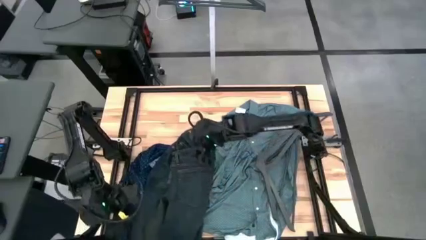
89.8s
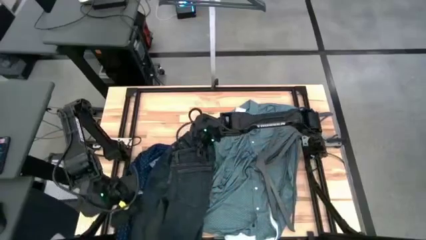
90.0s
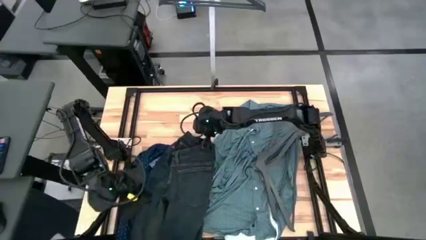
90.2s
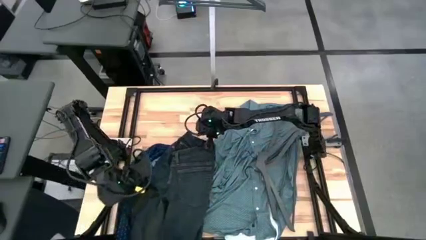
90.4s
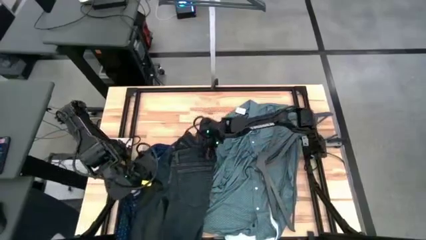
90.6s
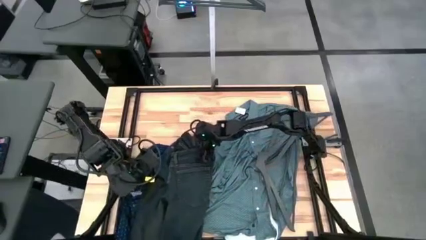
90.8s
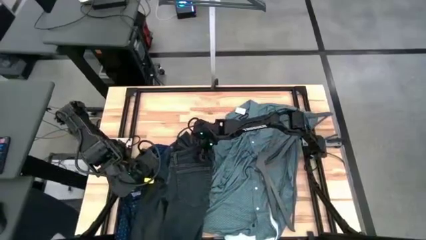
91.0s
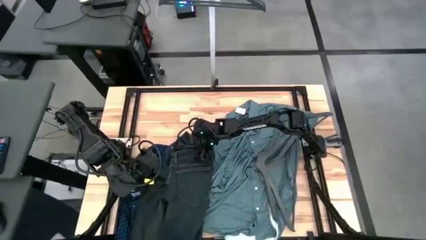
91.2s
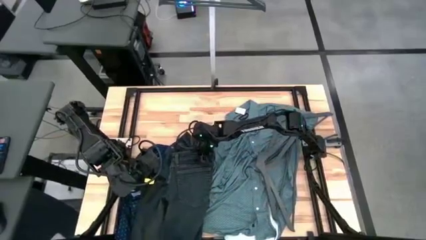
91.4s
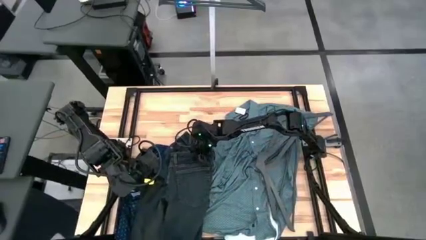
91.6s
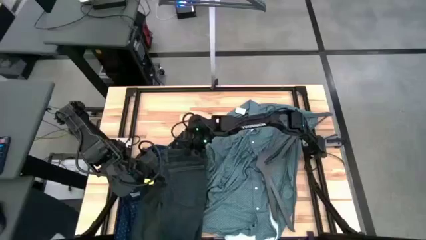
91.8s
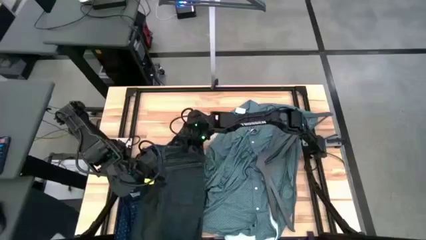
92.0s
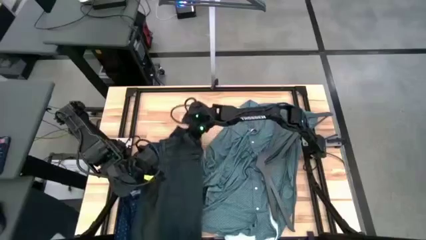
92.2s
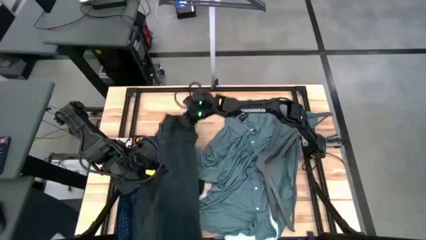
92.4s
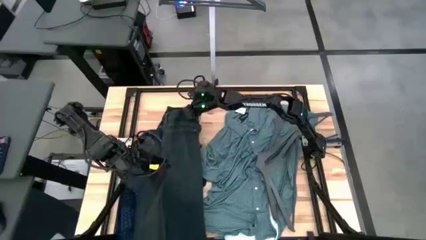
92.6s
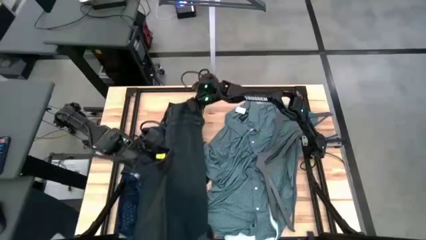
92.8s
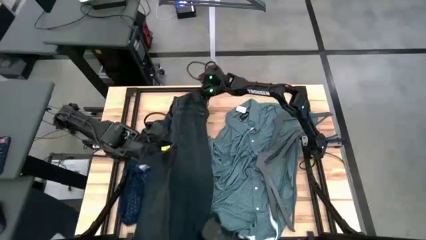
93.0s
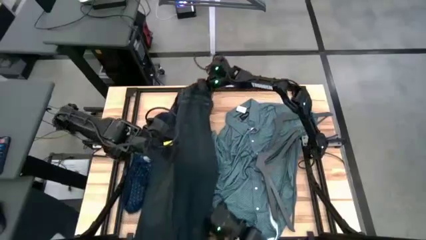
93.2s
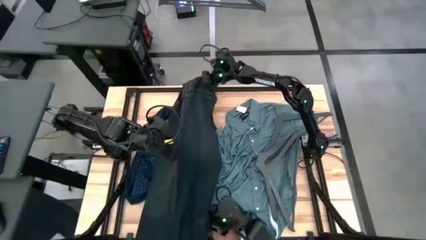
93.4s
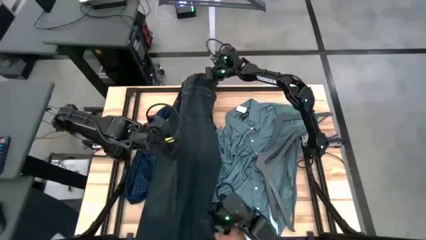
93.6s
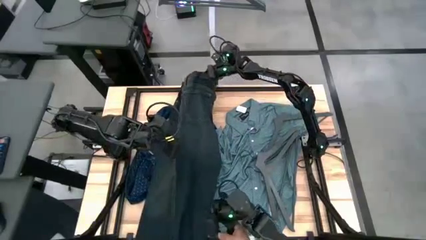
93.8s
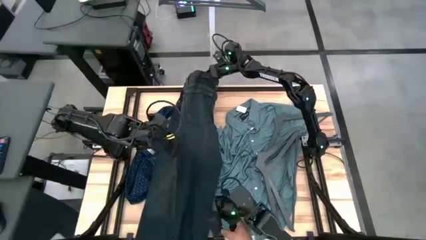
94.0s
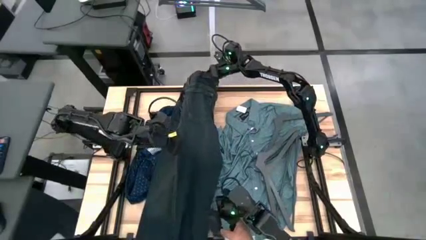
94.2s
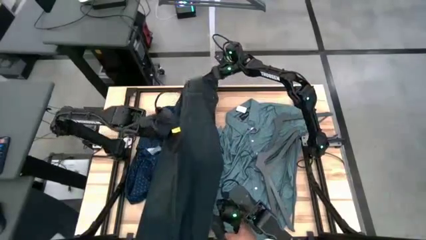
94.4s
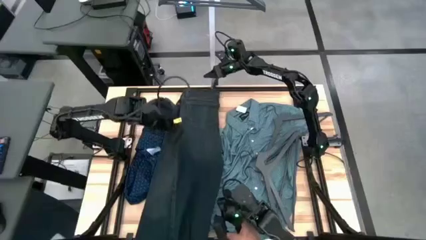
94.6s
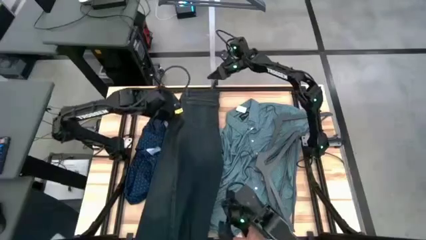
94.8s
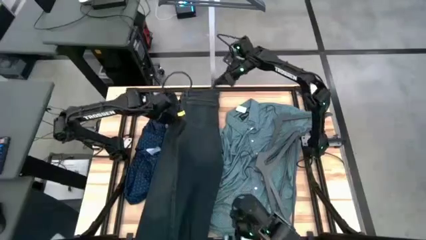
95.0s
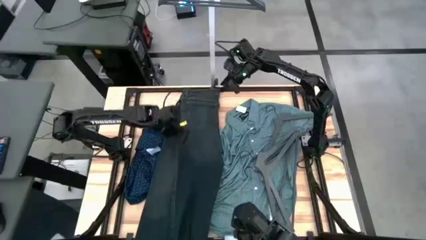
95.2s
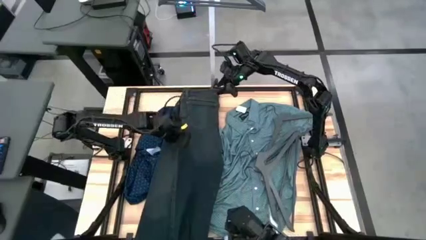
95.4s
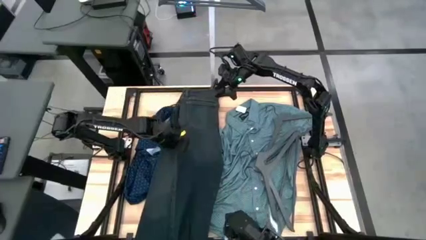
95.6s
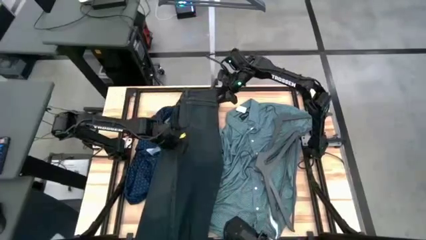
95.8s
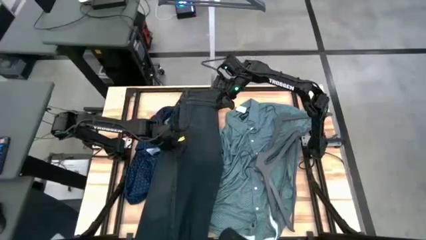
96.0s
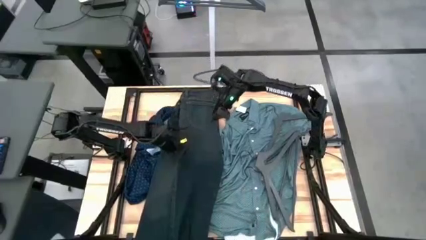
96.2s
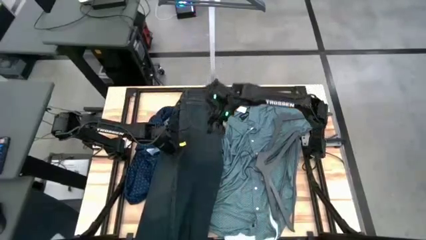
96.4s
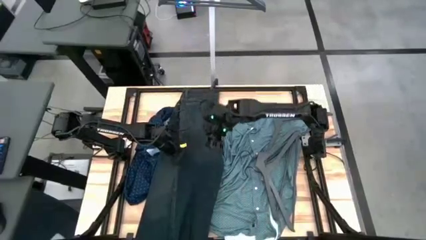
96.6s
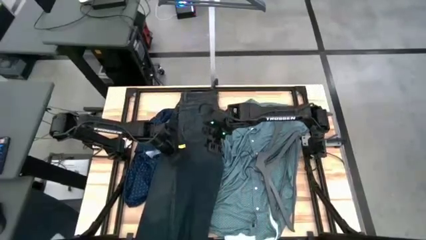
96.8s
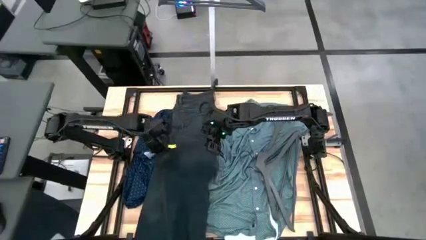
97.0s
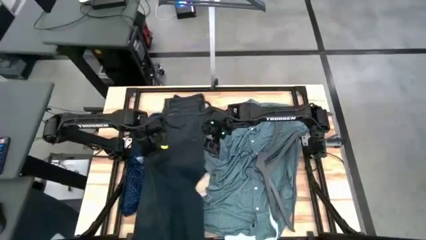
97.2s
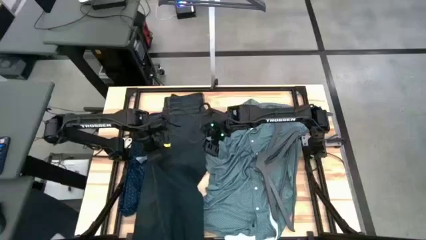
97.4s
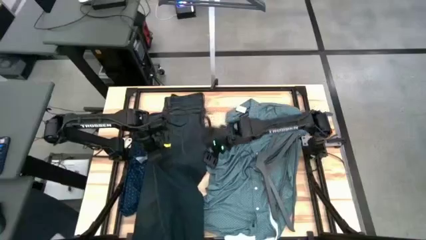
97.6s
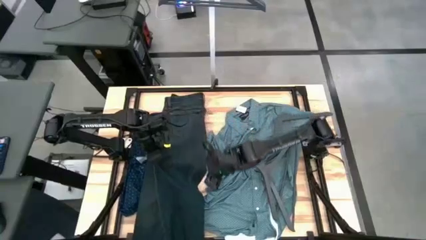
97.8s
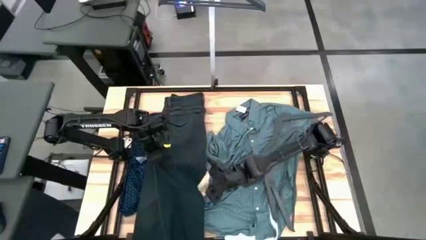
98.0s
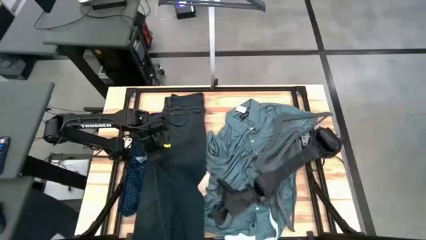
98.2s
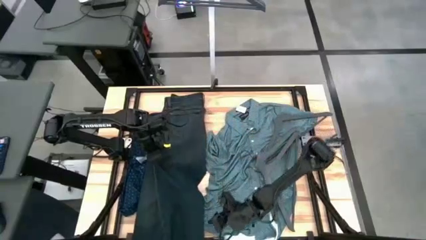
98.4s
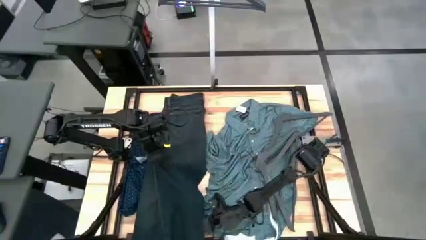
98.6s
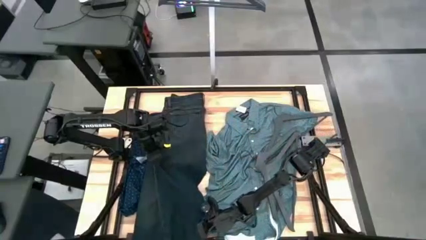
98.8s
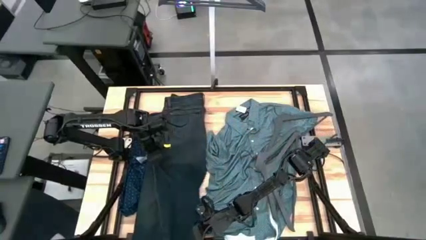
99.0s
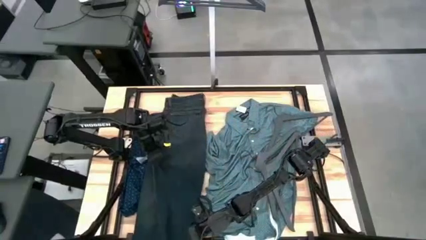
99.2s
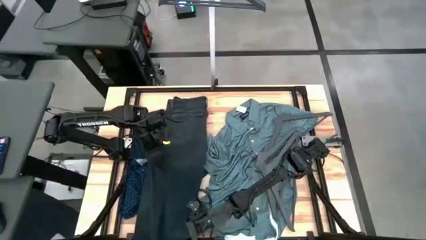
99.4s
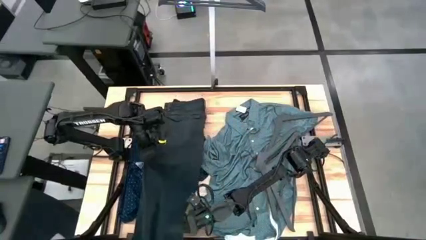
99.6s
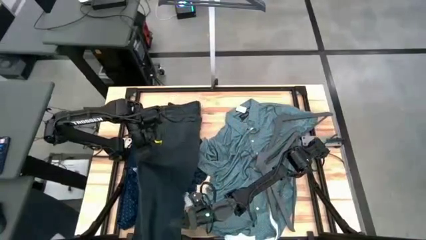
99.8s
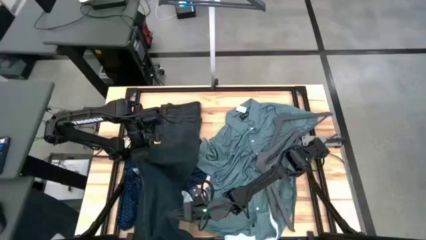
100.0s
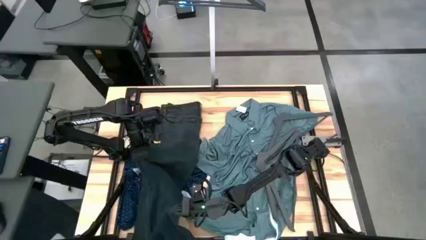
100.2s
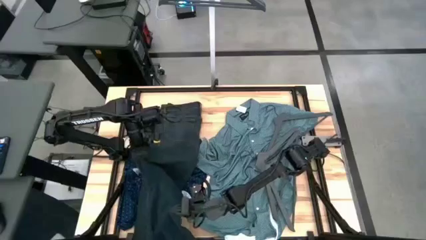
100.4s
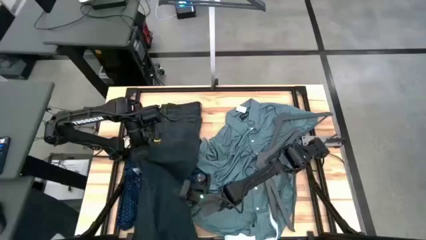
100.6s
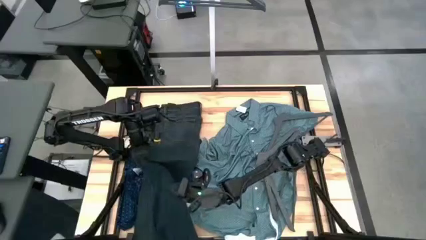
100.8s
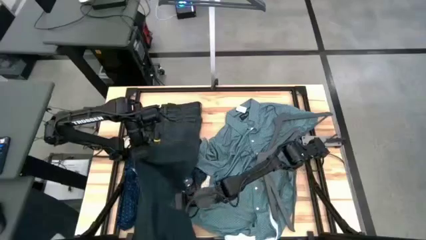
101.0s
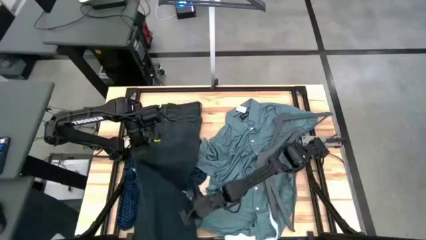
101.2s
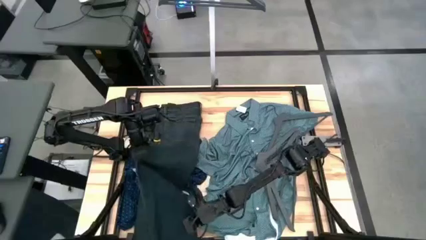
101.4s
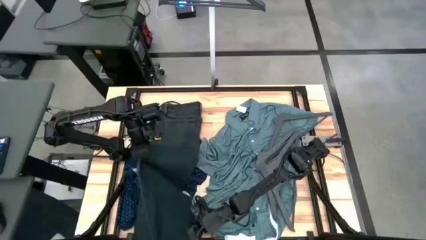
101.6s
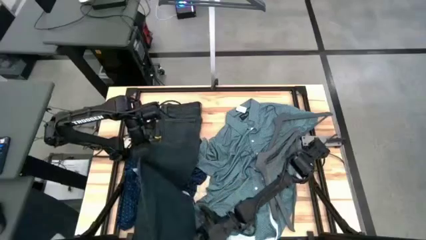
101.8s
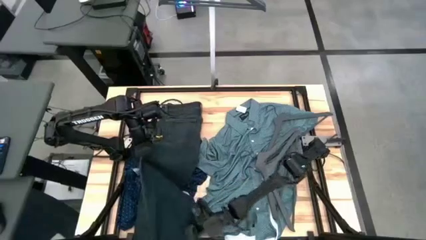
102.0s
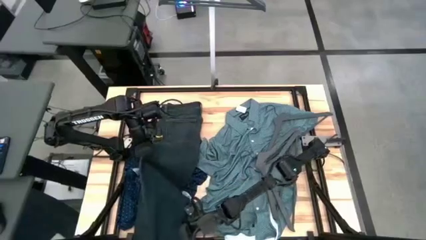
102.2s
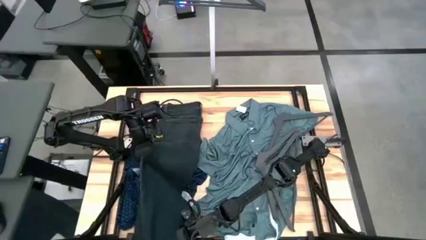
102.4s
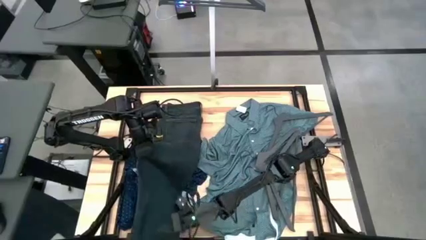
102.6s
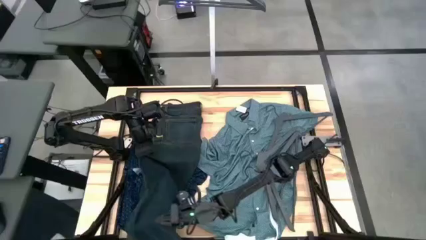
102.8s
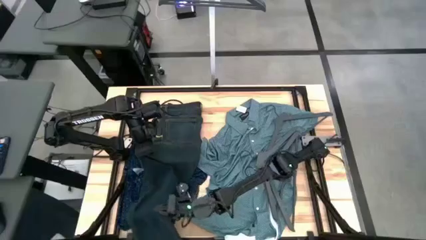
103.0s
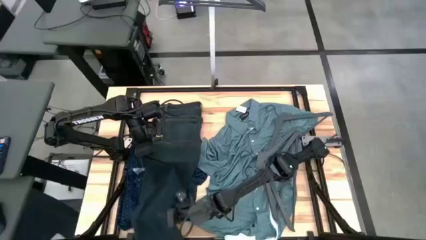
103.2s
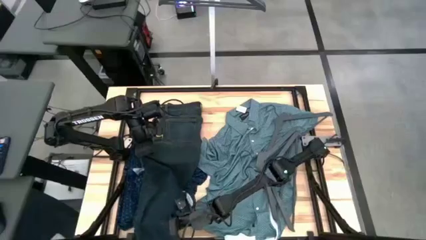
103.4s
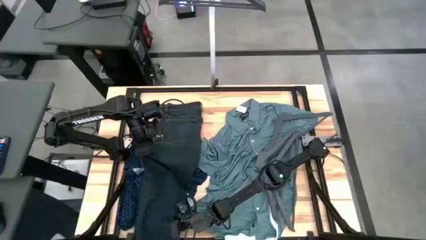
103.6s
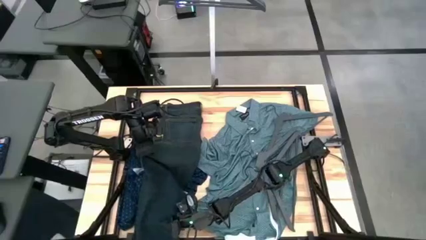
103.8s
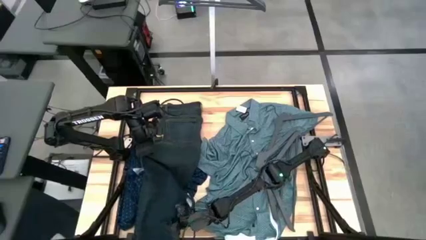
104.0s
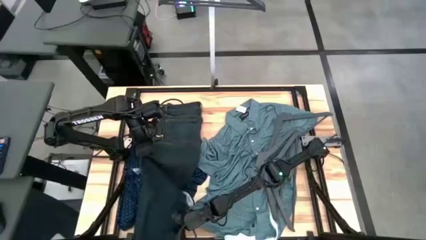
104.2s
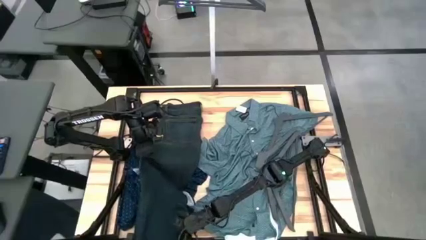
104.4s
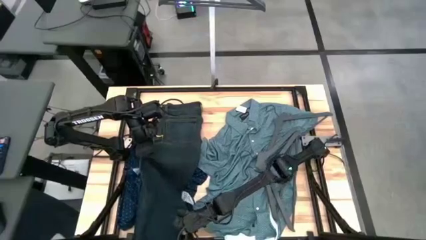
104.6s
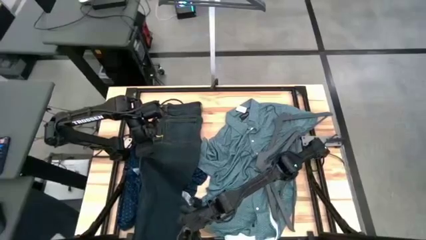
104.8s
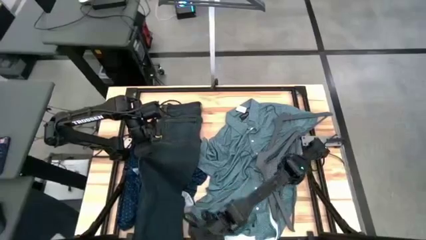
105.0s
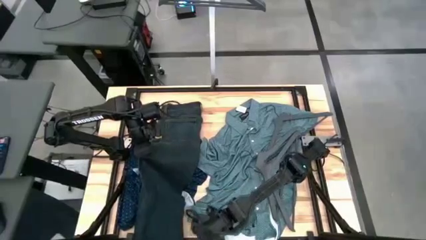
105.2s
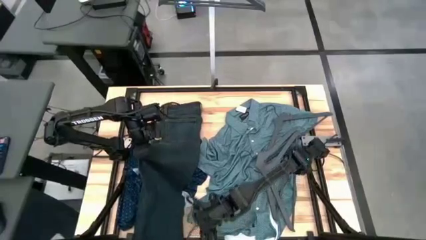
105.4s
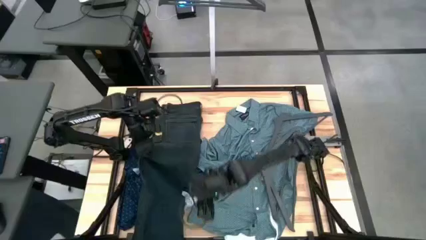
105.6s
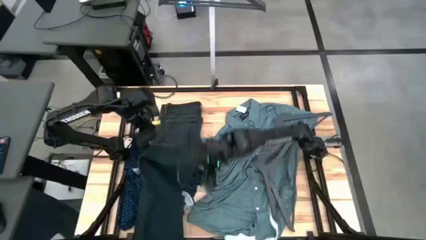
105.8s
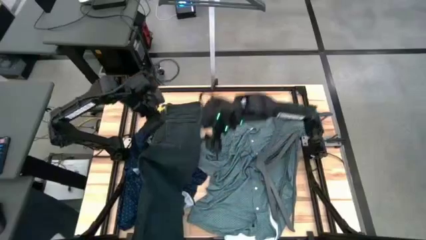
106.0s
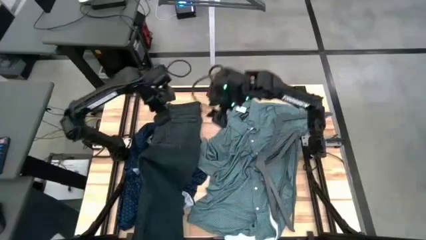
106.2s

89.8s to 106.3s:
Task: Hang clothes
Hang the black pants on the rack
